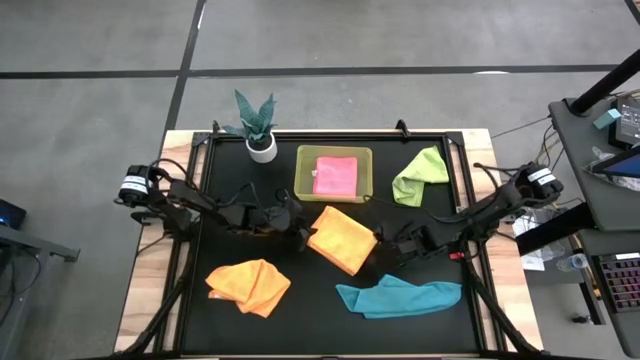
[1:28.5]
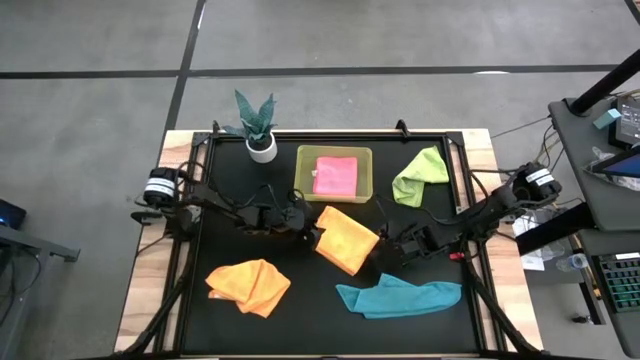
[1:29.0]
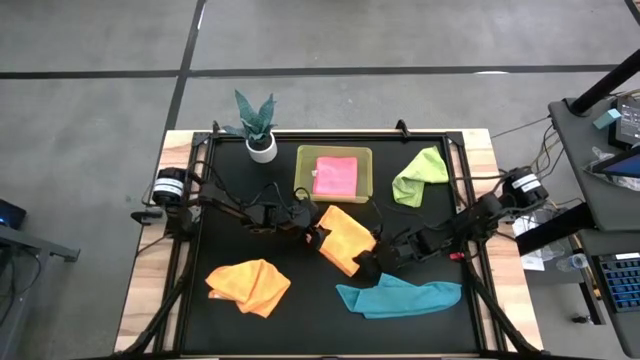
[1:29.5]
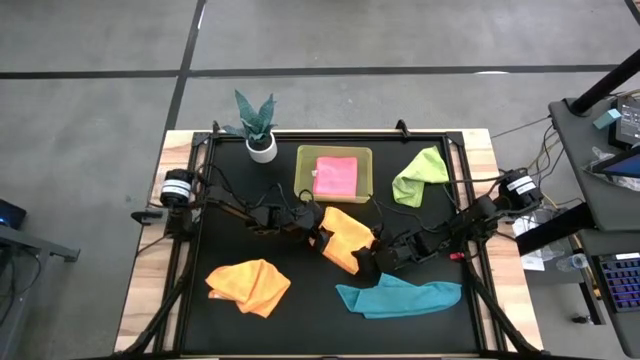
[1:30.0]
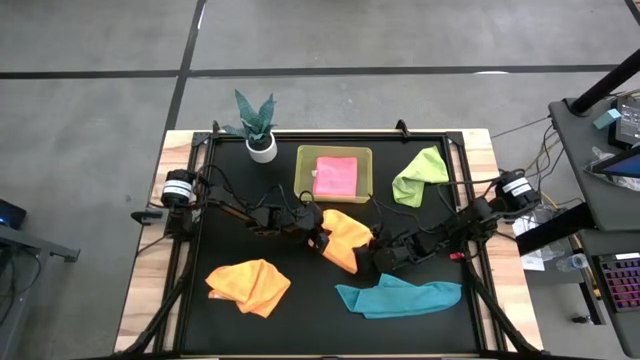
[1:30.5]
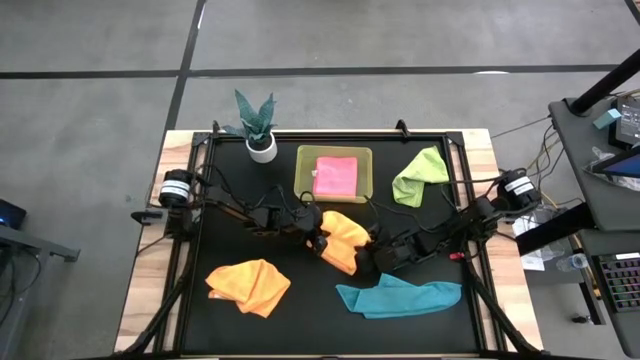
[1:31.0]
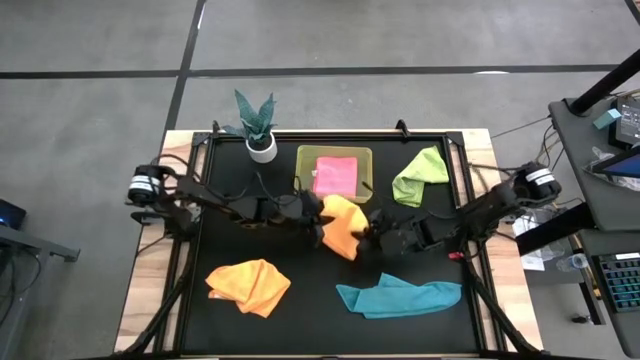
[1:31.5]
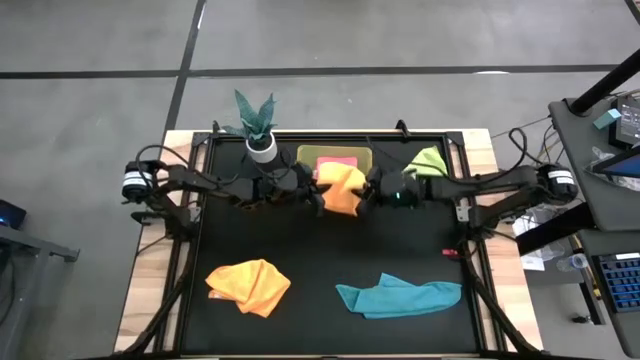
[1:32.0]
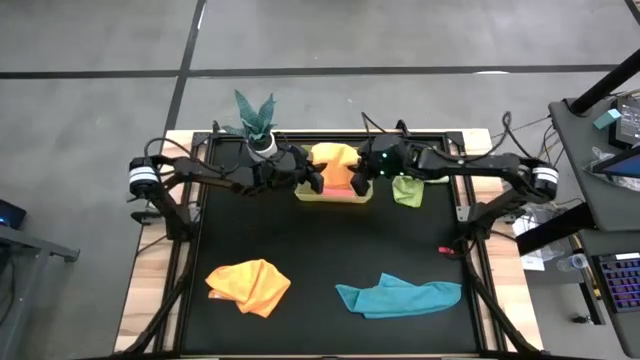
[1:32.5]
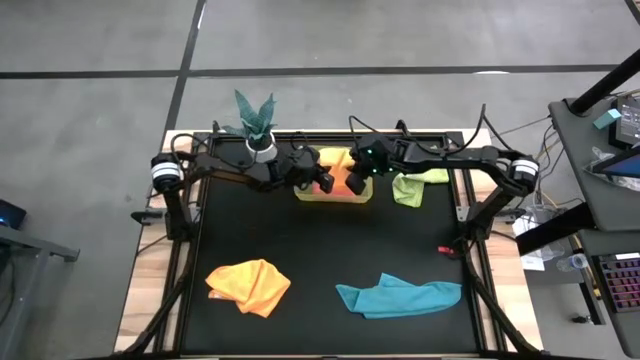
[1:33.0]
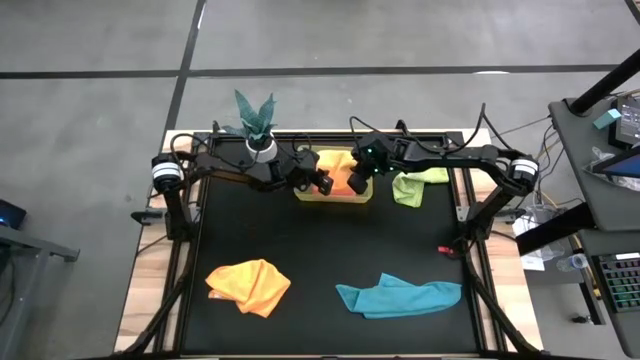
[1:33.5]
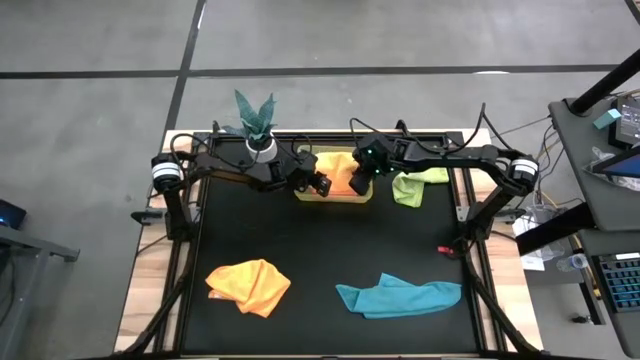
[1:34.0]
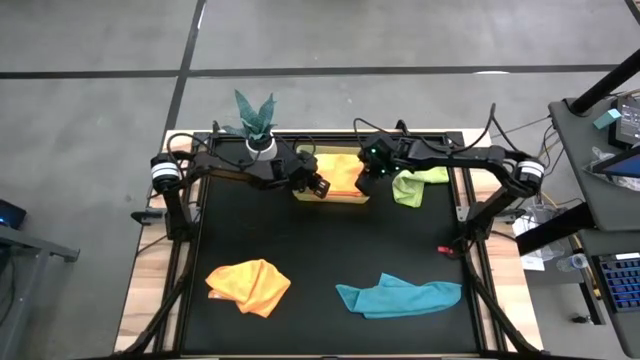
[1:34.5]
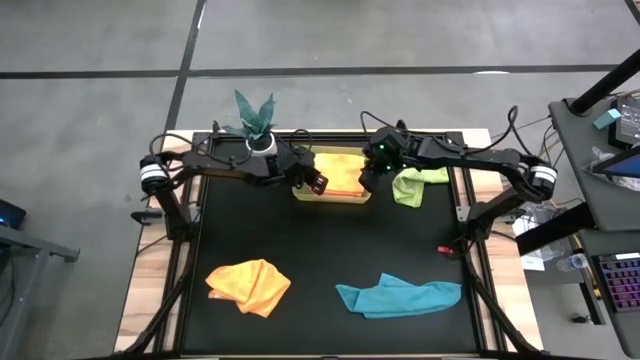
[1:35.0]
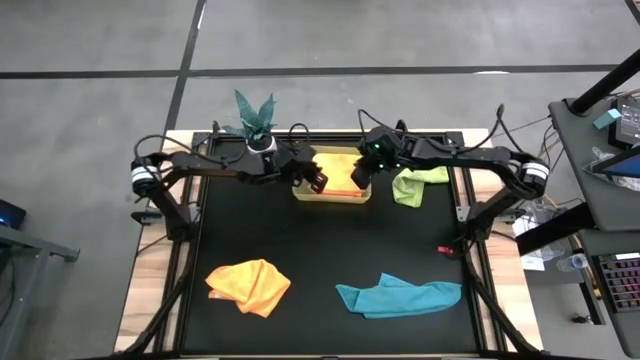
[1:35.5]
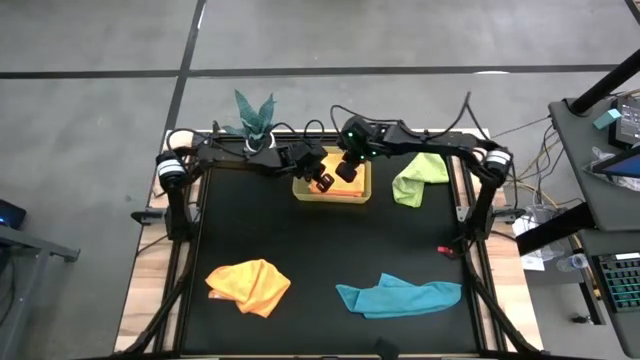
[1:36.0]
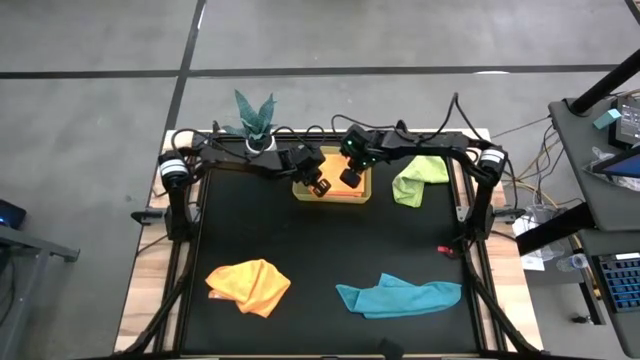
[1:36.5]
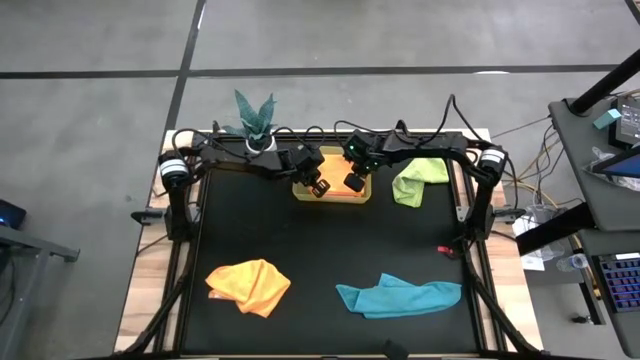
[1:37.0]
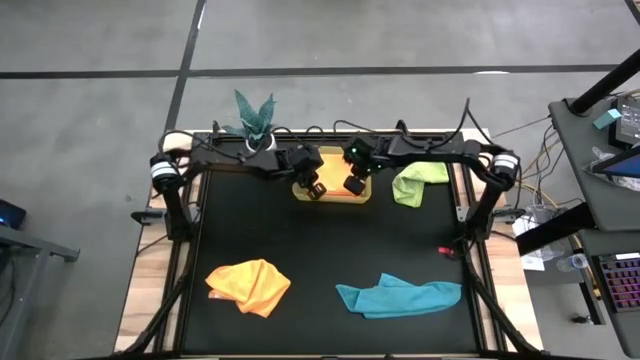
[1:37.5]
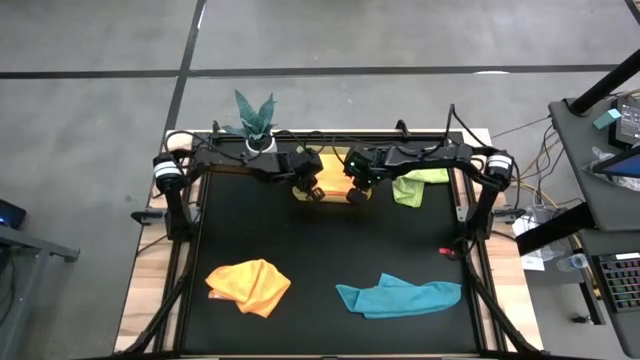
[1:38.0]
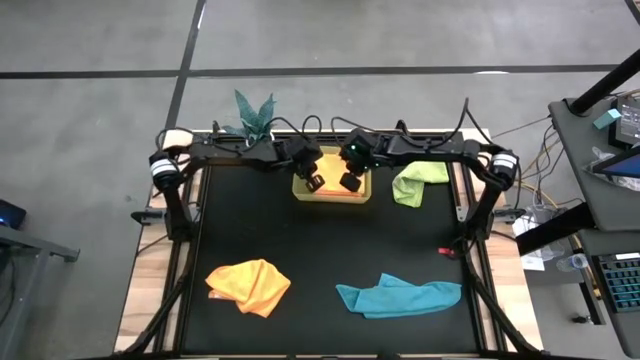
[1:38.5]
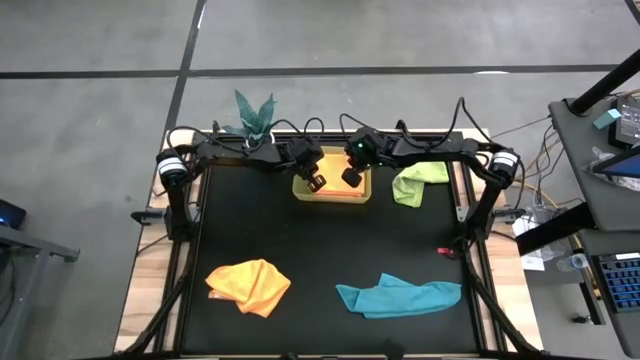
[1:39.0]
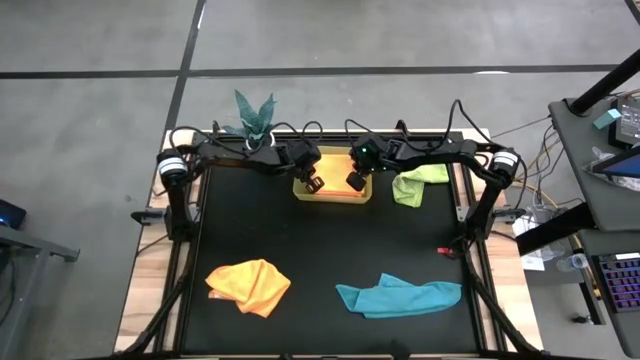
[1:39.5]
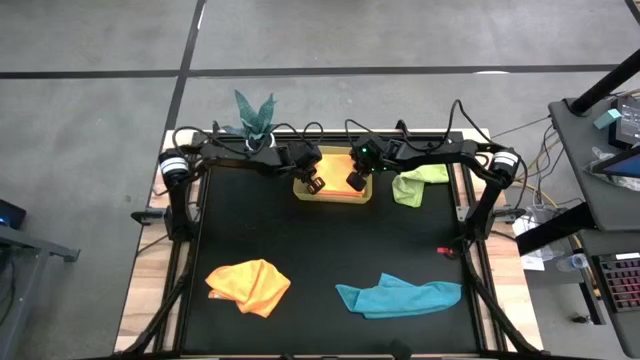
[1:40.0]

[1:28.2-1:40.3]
Task: Fold microfiber towels
Put the folded yellow towel into the bin
